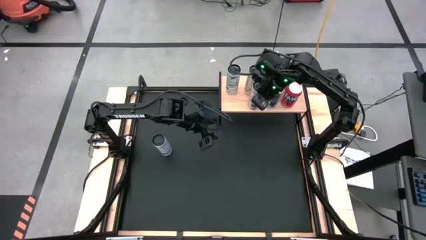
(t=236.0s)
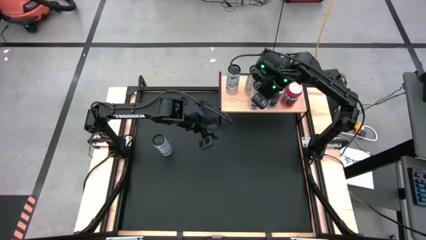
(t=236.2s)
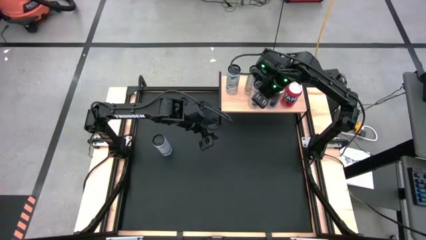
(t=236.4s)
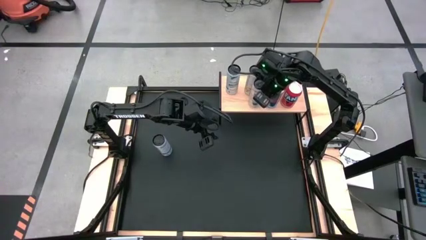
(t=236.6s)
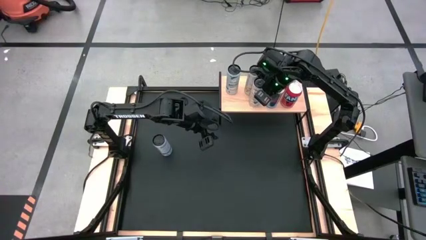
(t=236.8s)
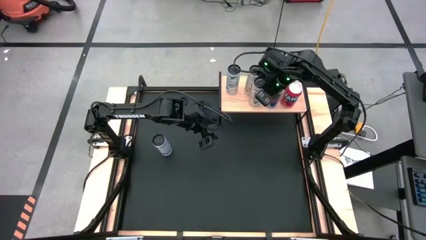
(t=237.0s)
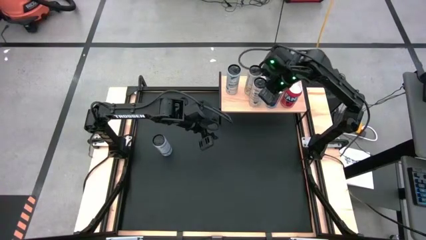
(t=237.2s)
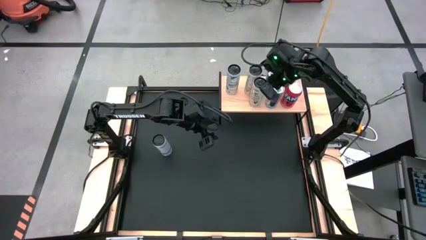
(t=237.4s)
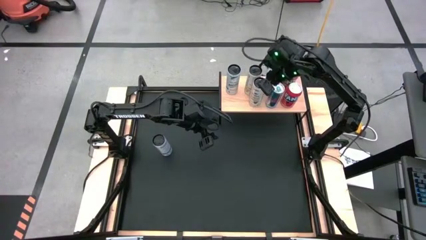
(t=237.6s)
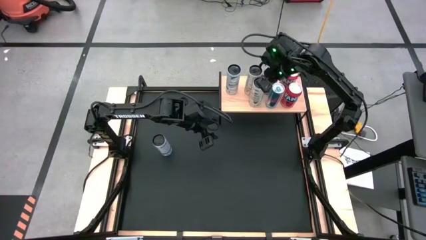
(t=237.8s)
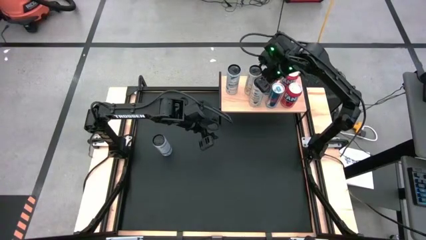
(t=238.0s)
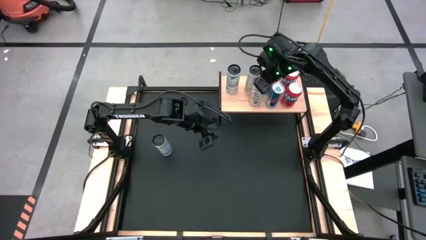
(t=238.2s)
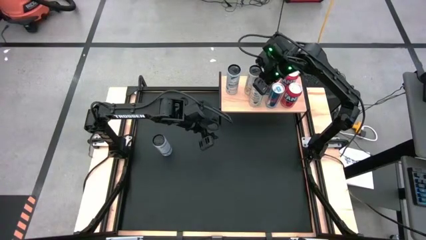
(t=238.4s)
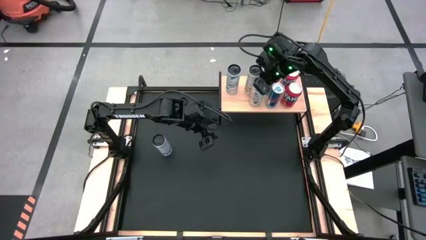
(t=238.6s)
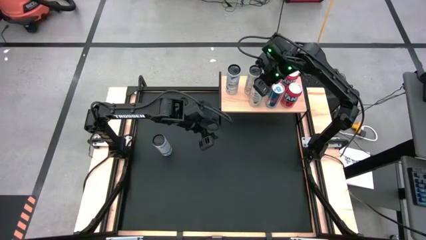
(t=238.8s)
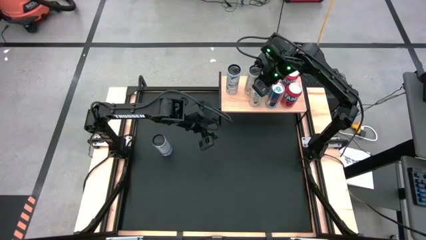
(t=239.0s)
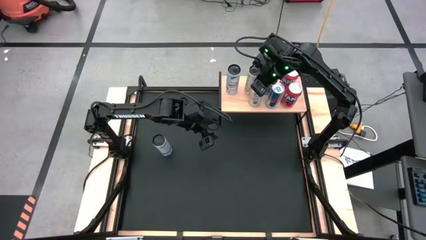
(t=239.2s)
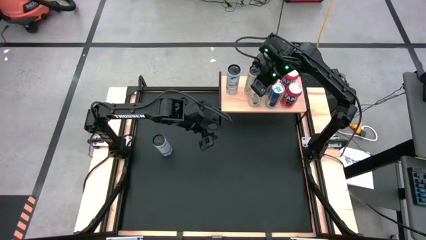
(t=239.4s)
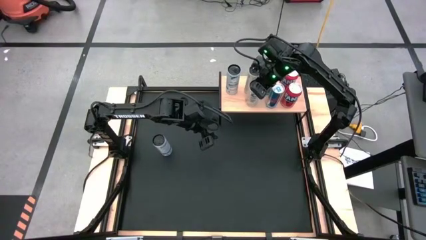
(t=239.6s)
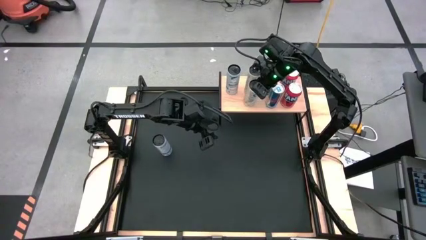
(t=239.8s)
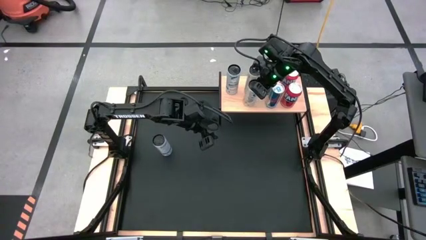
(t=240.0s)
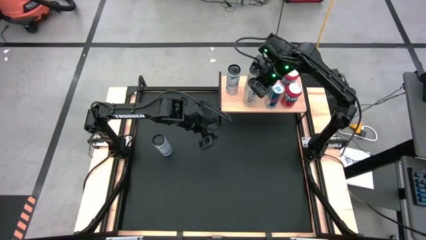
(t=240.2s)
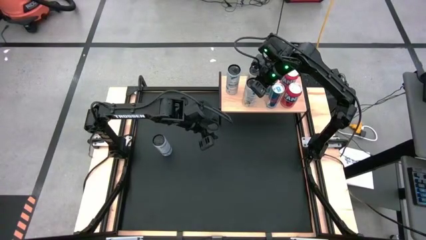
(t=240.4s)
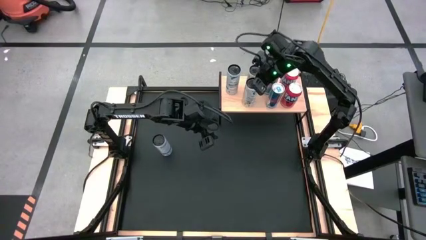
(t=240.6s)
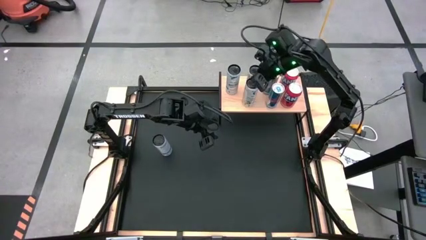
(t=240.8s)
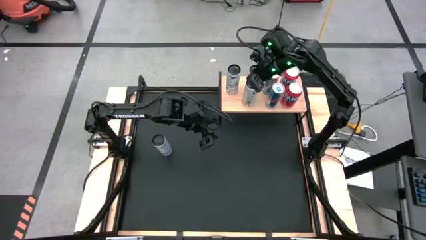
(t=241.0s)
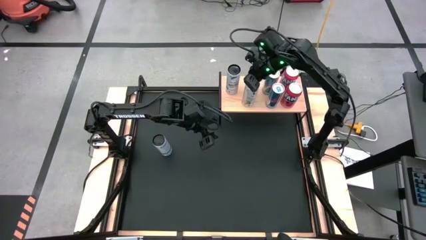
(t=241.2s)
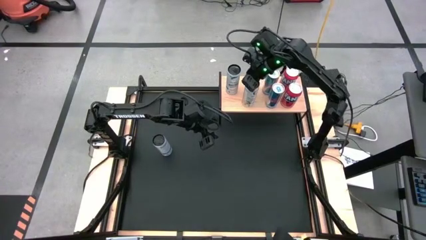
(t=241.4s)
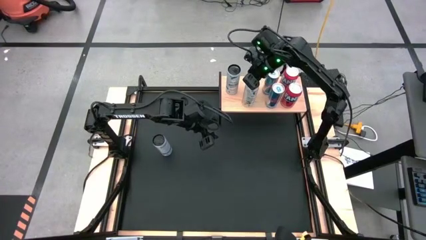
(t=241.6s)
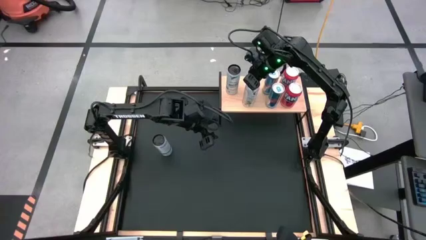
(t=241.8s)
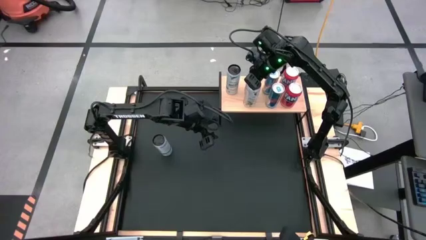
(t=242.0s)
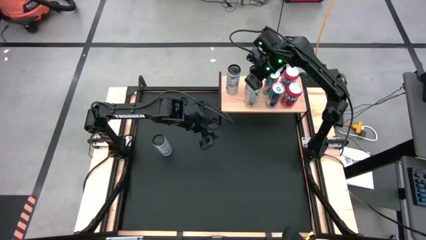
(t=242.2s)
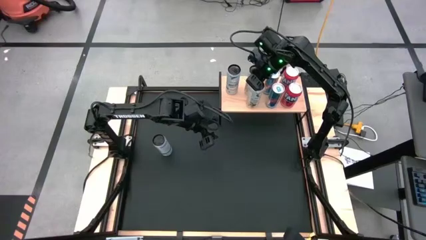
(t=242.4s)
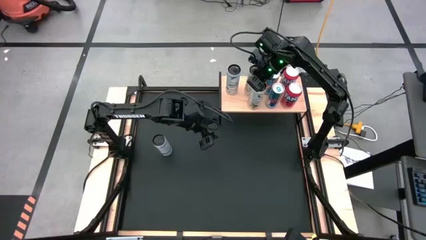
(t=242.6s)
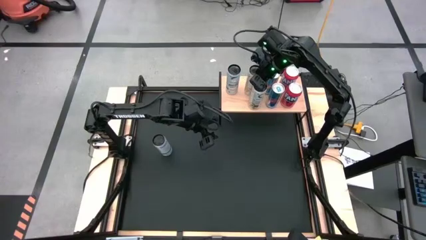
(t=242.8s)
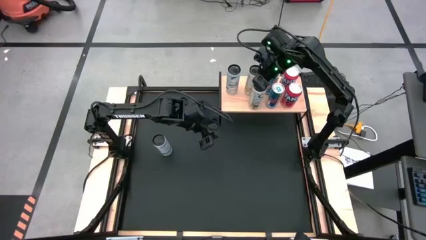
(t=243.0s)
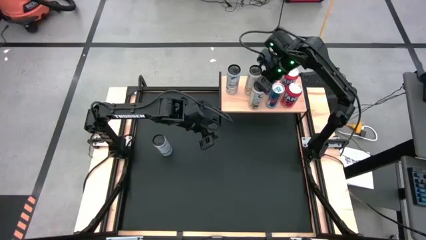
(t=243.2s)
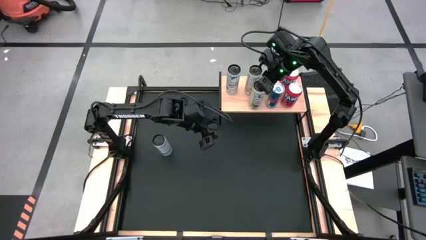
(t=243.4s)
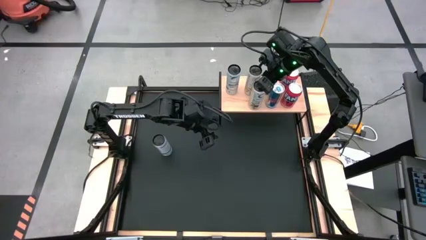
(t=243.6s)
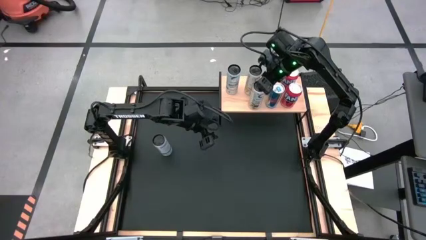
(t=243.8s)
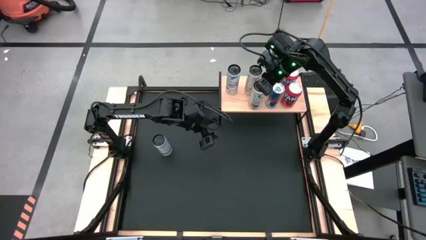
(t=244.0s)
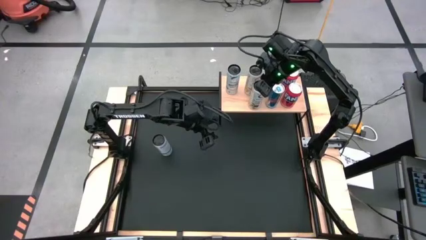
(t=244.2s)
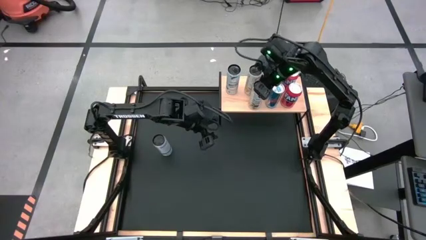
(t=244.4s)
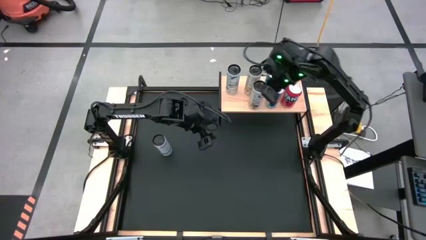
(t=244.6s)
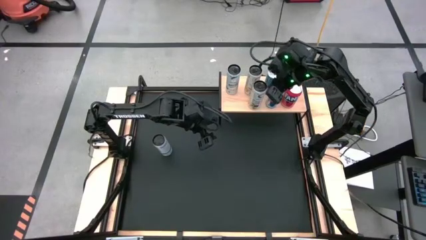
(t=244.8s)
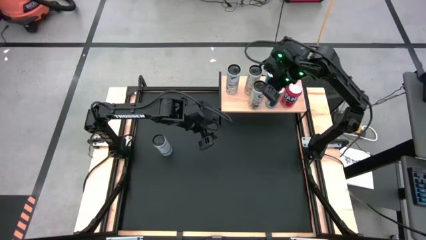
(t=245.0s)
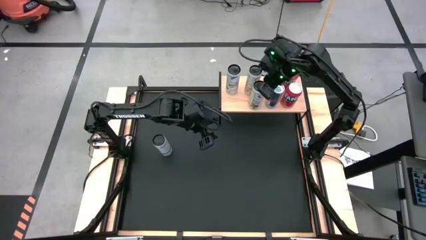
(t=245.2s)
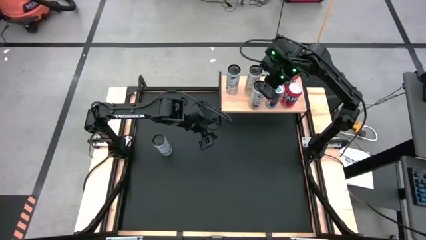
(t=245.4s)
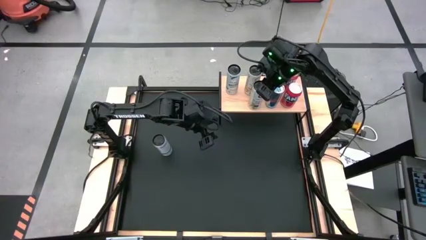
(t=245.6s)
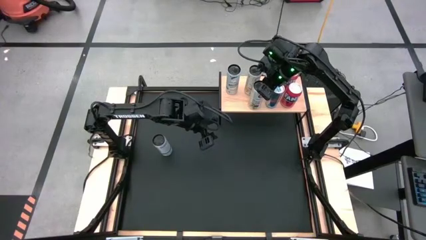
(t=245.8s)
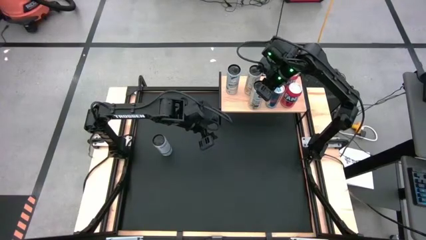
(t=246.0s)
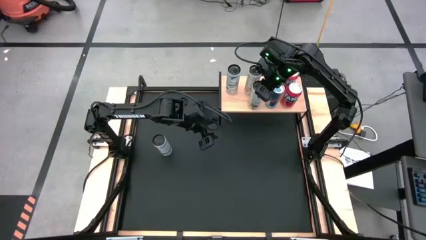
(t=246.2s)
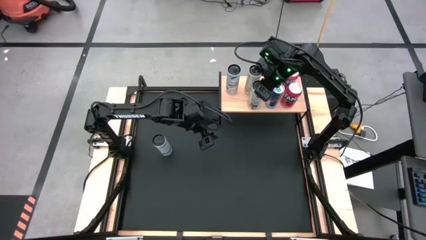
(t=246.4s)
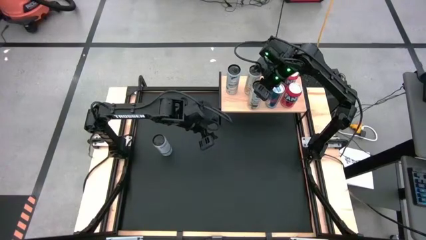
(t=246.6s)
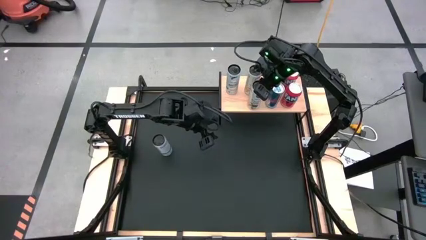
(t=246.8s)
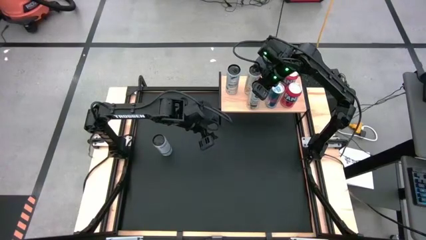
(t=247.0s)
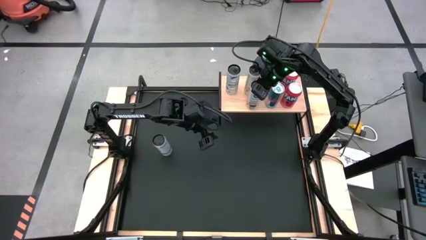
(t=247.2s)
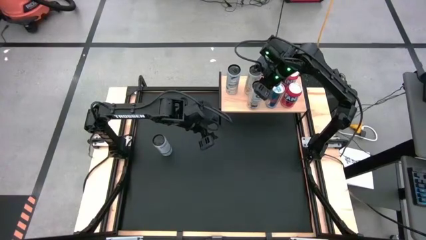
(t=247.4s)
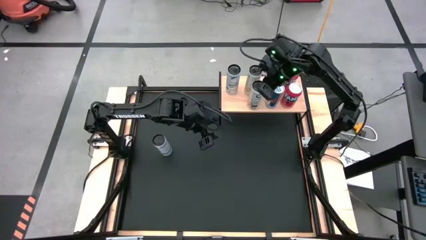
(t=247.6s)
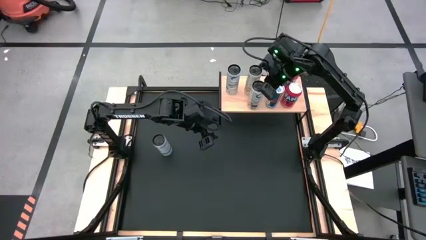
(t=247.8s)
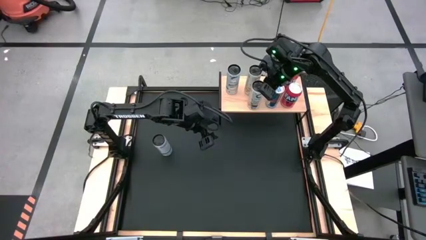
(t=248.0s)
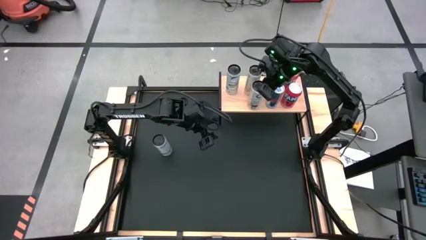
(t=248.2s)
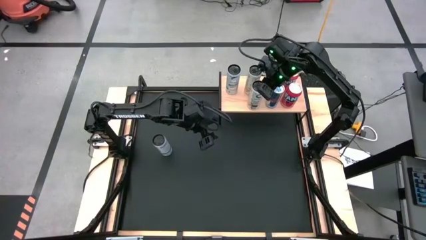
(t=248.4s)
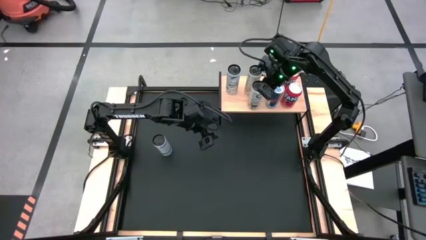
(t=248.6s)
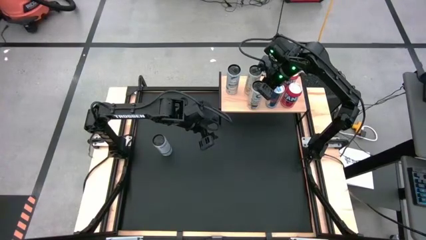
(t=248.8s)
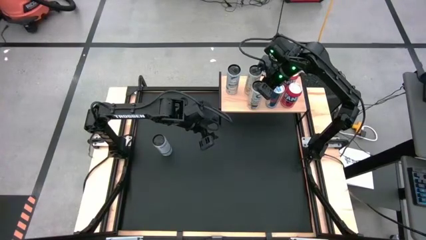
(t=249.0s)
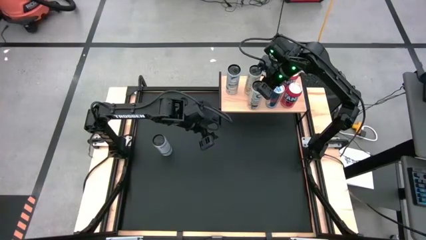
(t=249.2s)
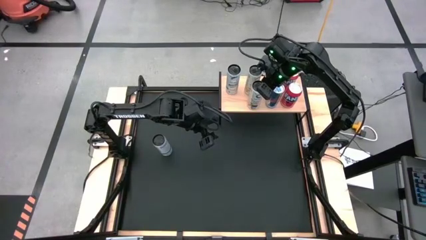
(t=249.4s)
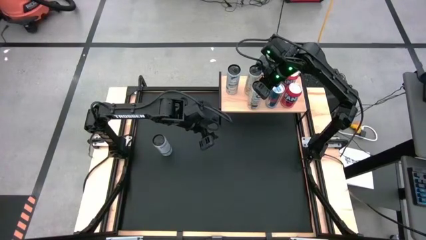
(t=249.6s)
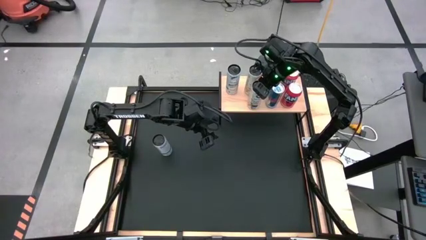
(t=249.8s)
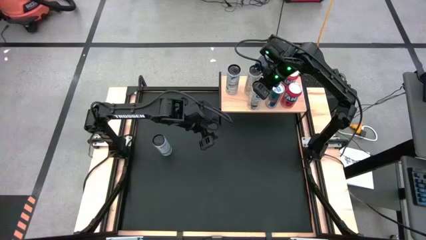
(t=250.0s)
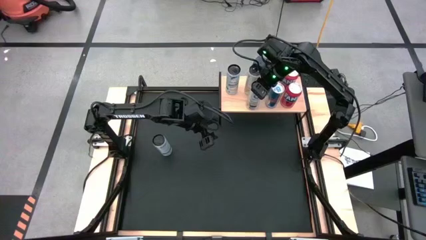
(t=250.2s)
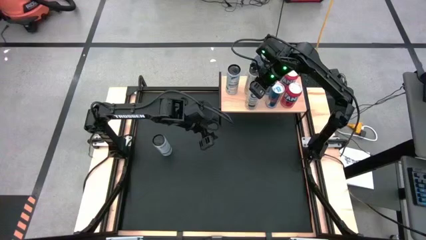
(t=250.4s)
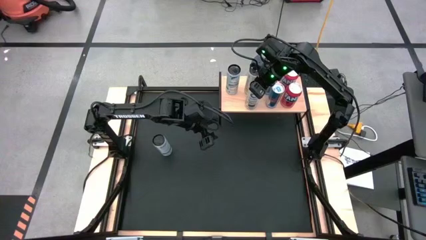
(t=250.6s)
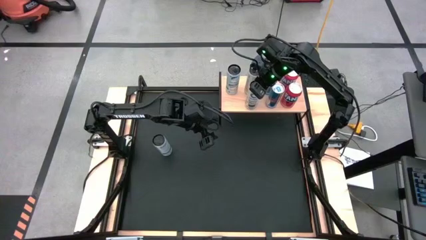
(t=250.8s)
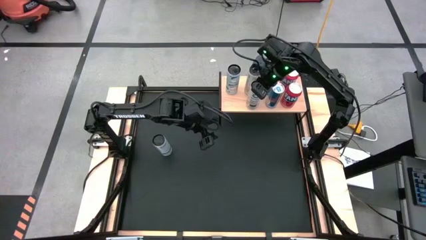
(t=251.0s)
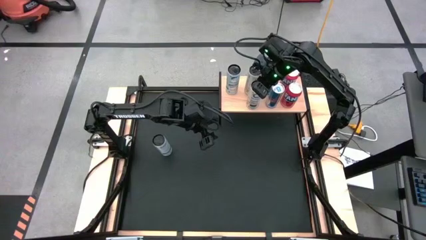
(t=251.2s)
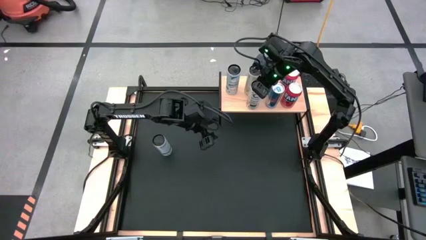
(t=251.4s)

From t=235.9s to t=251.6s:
Task: Place canned beverage on shelf
Put the white yellow soda can on the shelf aligned with the white yellow soda can
